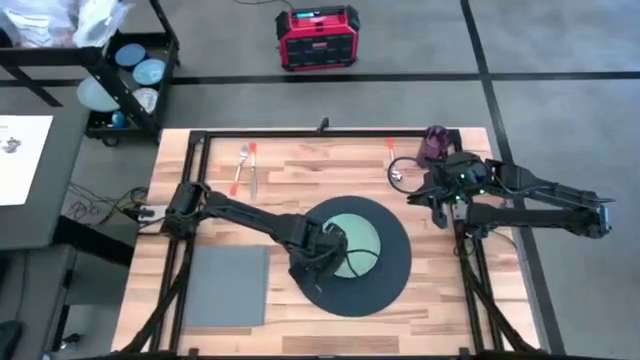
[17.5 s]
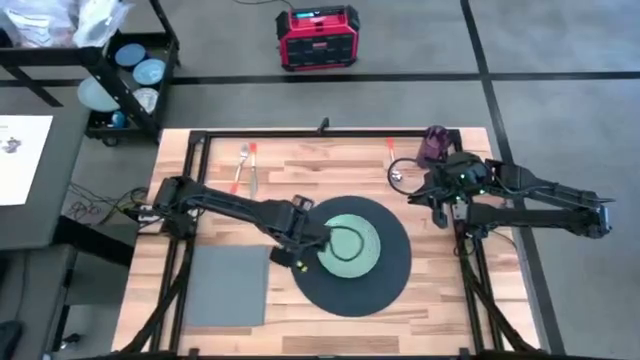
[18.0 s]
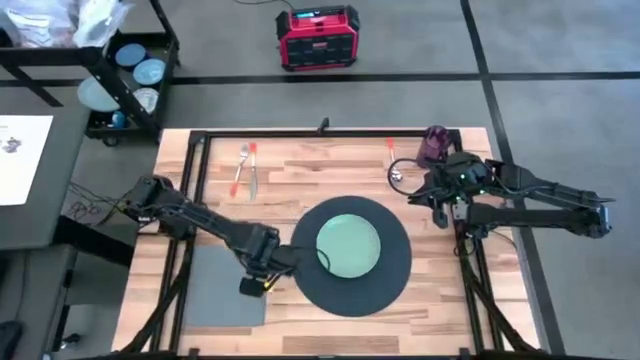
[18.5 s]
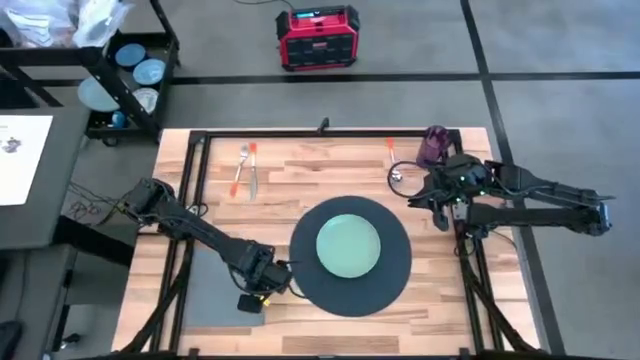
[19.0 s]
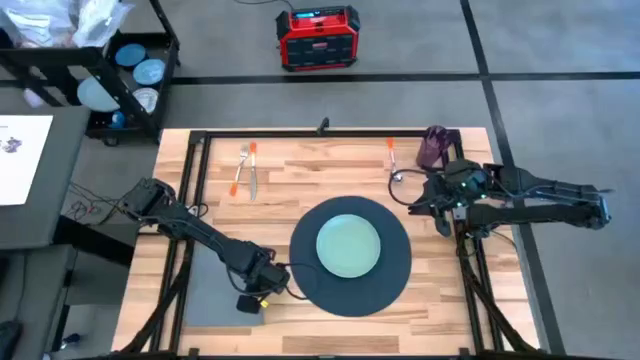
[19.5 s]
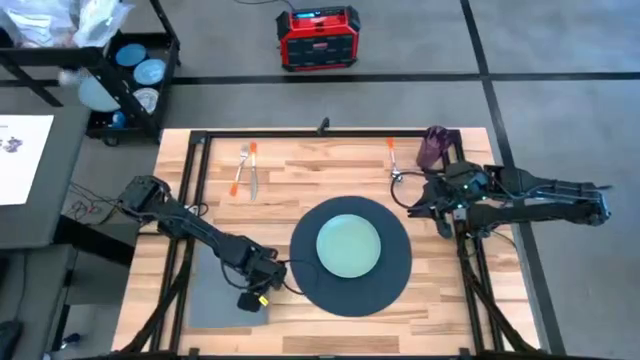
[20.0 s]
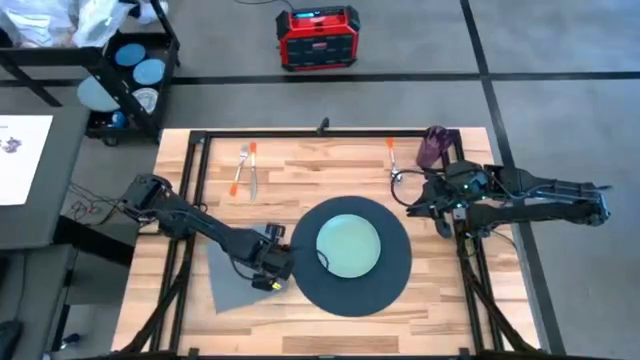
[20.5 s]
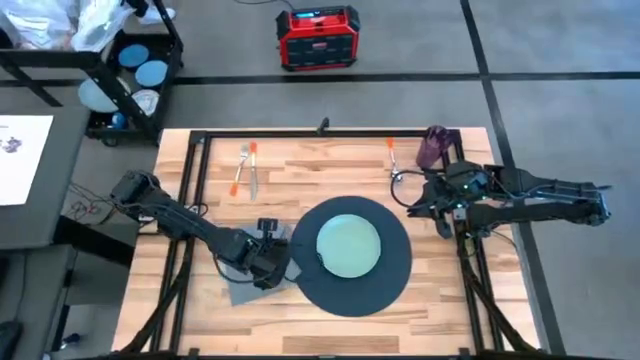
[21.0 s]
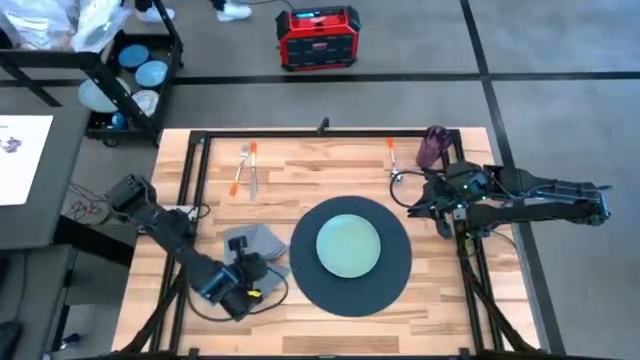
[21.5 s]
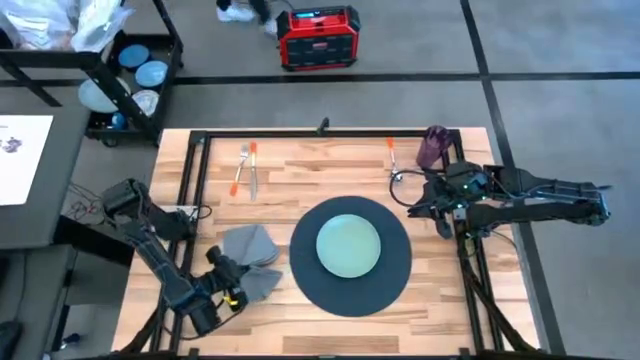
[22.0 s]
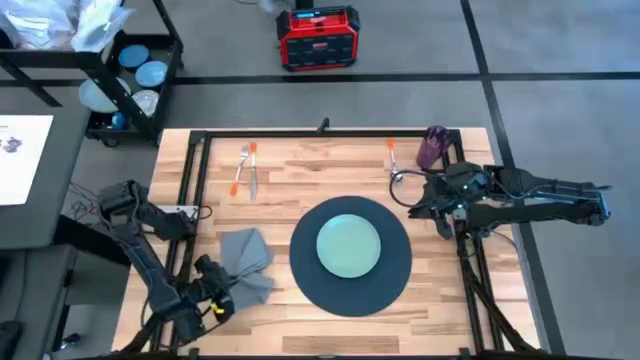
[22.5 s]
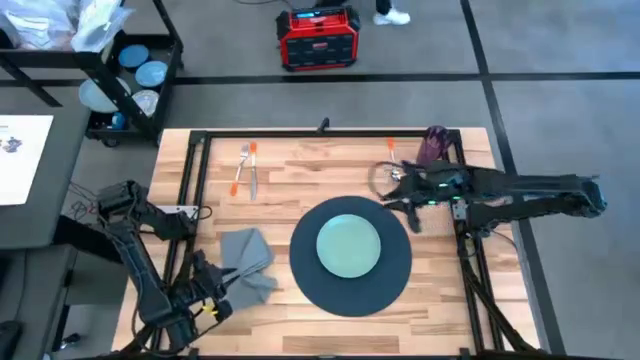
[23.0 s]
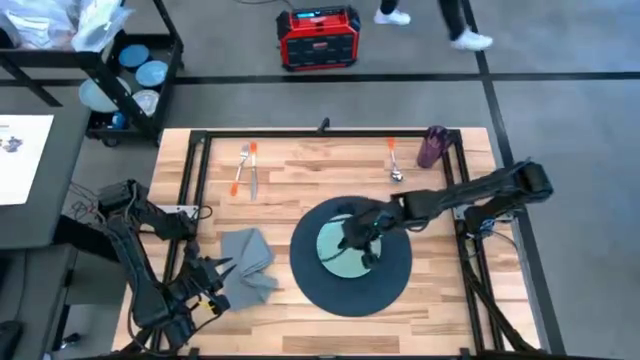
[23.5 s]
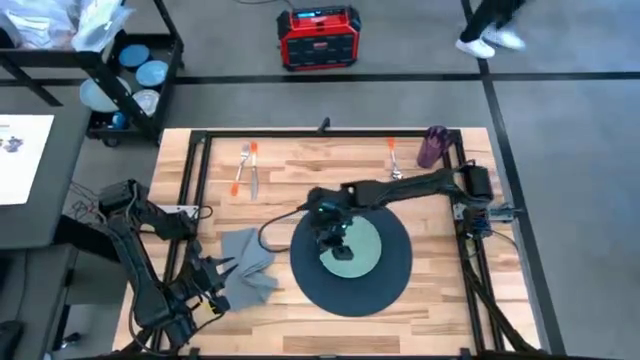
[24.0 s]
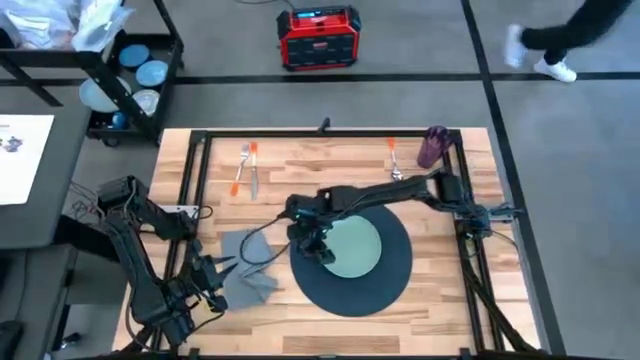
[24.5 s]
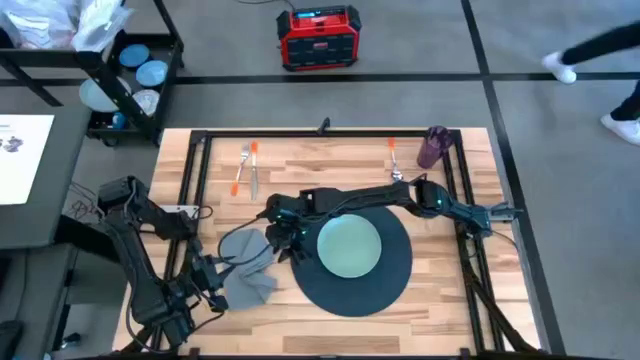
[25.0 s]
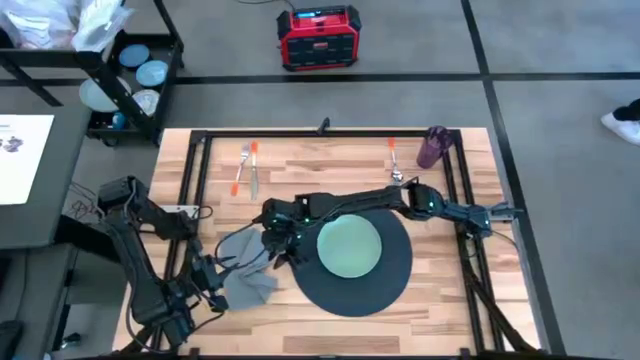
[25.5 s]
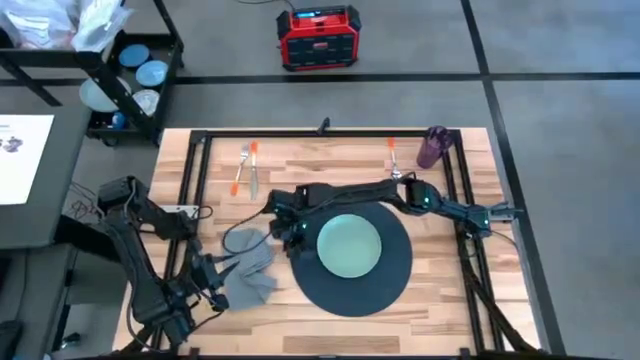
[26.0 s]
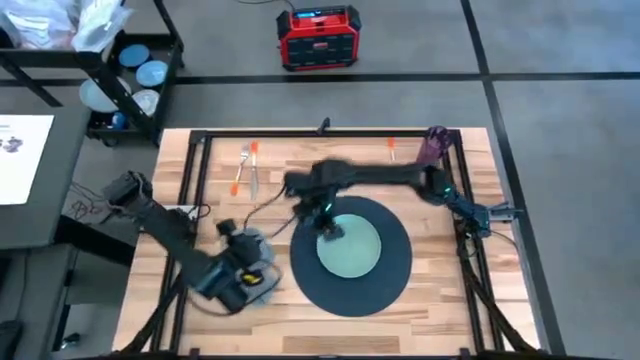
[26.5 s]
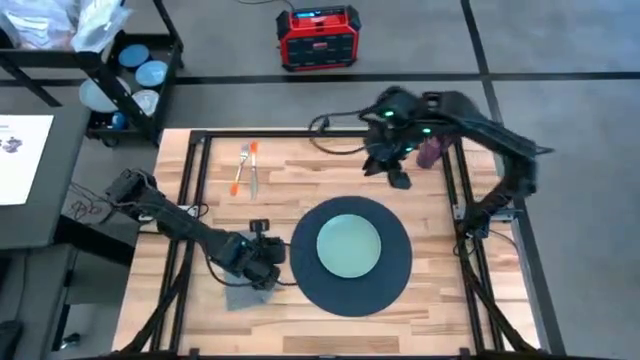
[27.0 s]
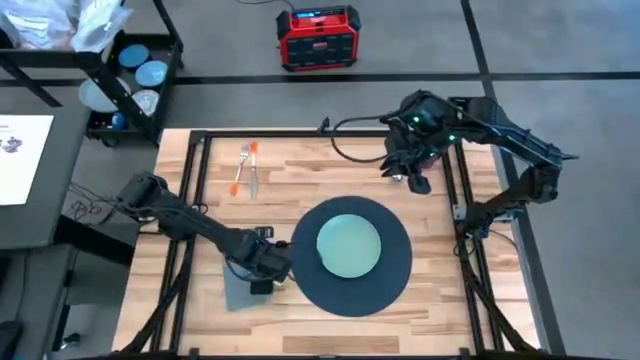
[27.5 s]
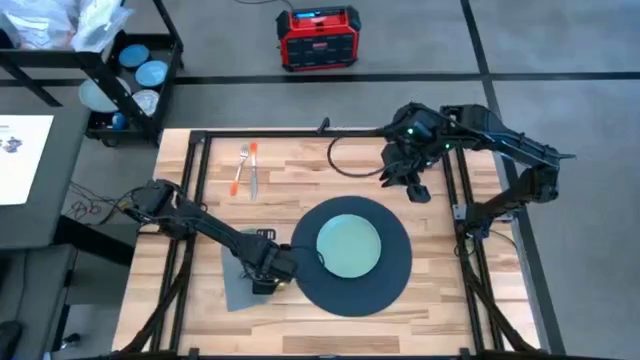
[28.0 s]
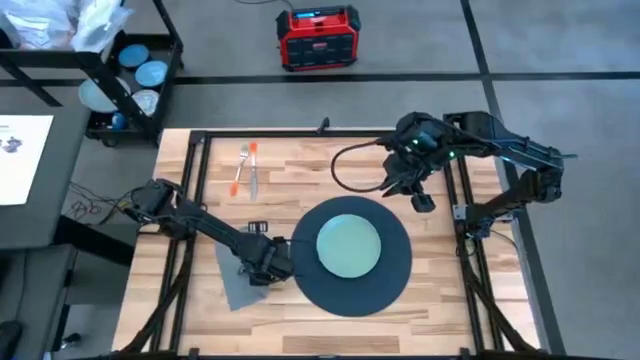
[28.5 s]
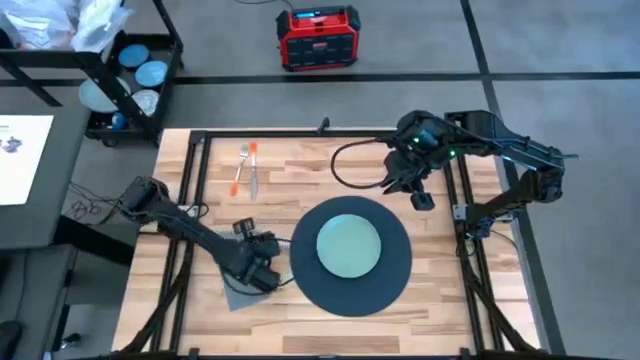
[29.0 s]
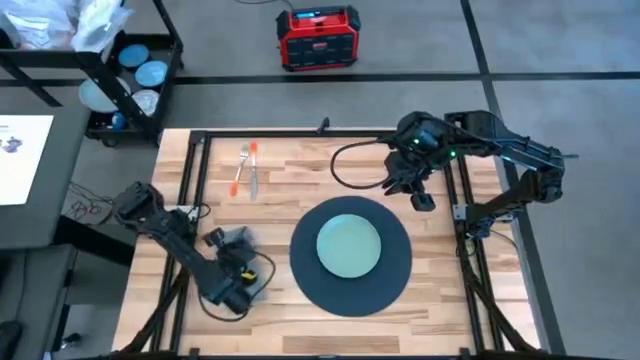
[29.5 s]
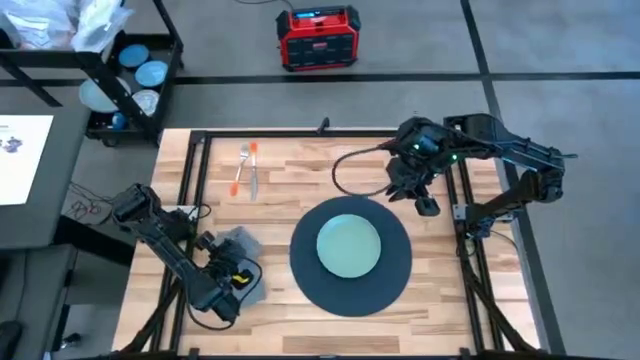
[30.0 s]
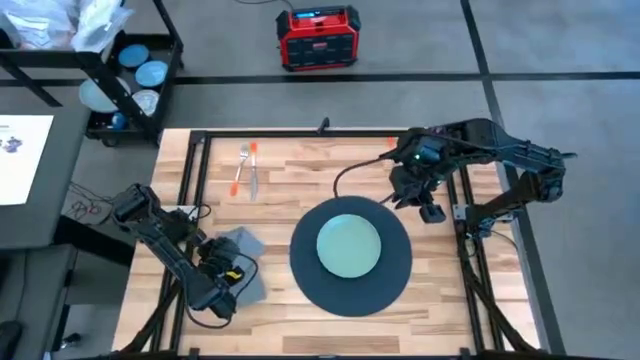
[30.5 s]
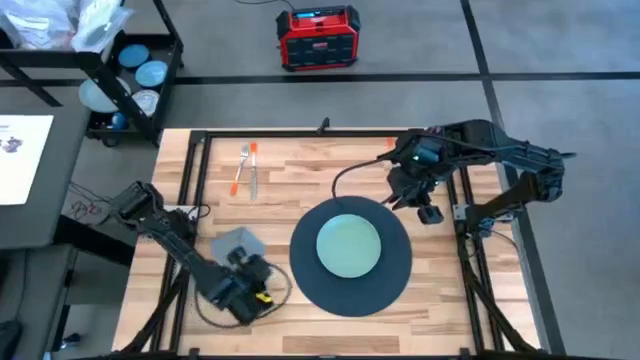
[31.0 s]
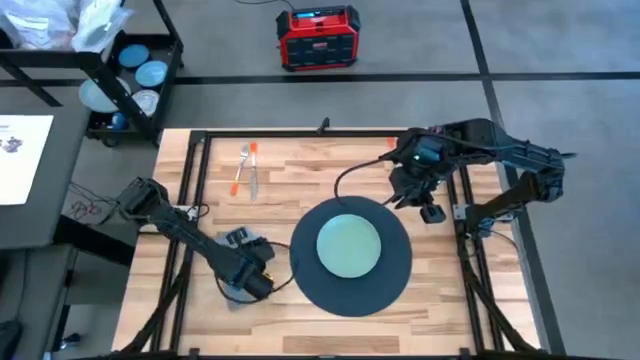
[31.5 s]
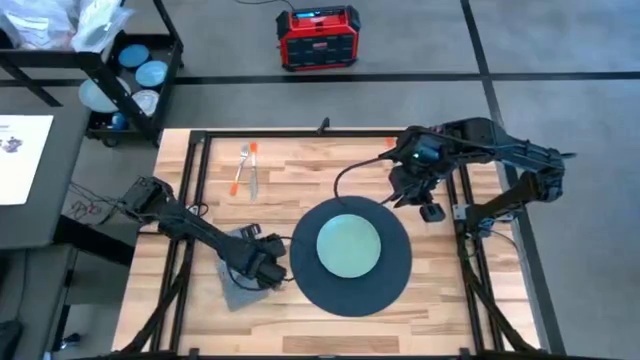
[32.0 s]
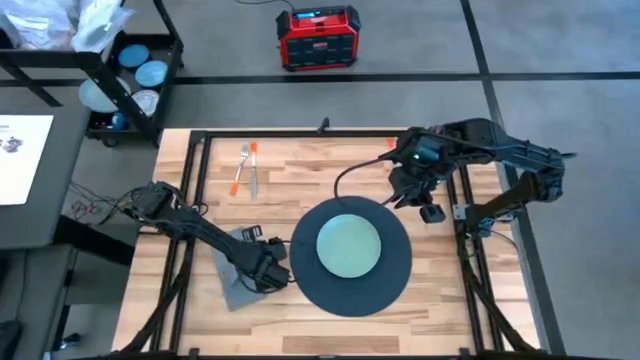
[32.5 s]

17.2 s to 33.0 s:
Task: Set table place
Fold the grey napkin

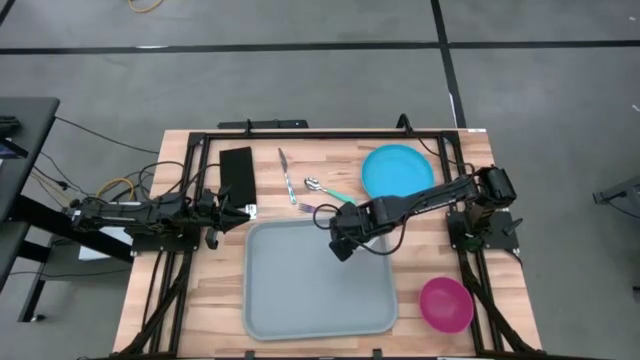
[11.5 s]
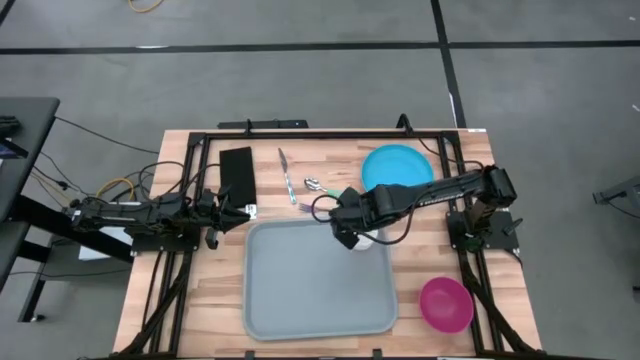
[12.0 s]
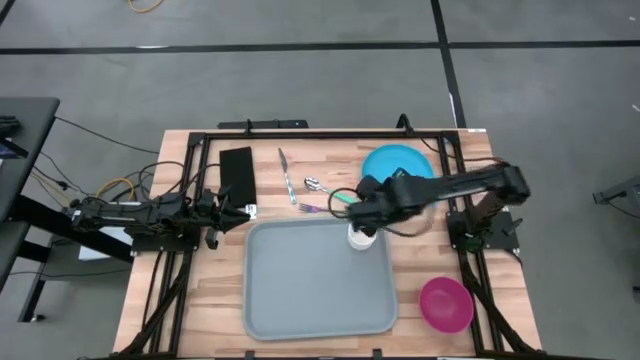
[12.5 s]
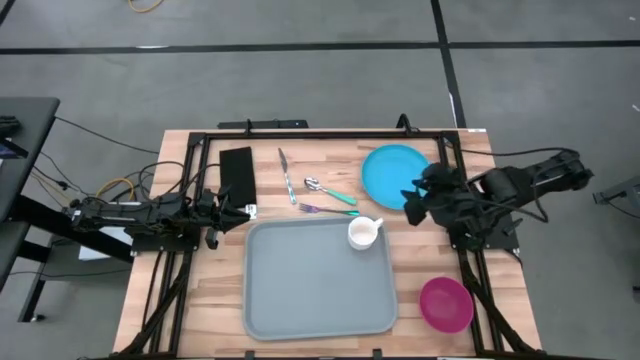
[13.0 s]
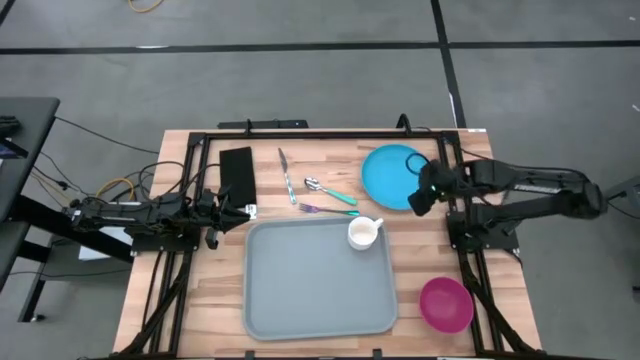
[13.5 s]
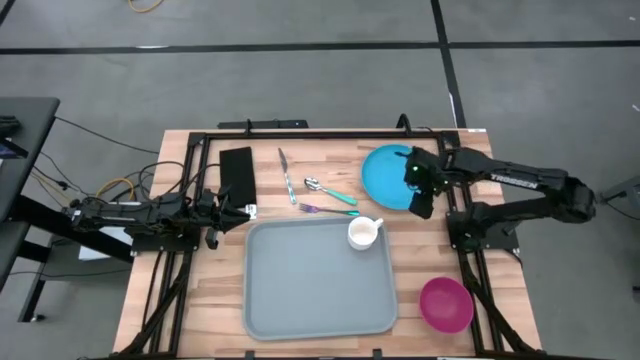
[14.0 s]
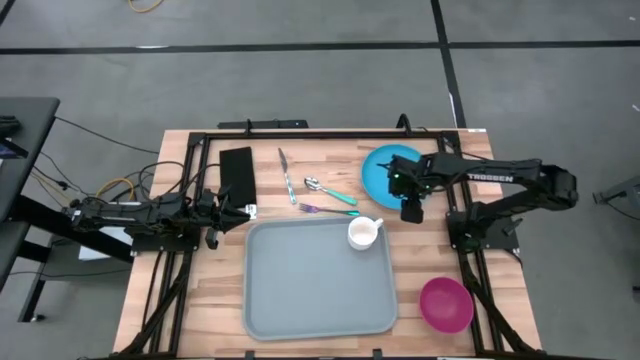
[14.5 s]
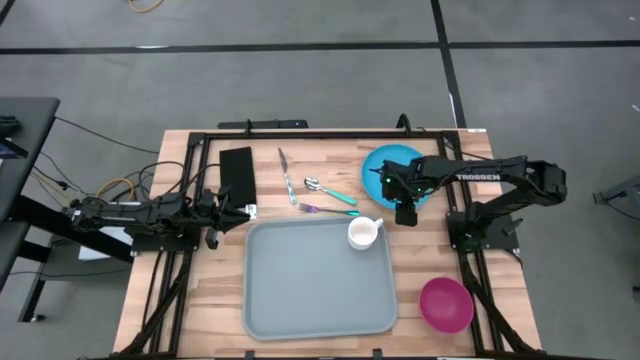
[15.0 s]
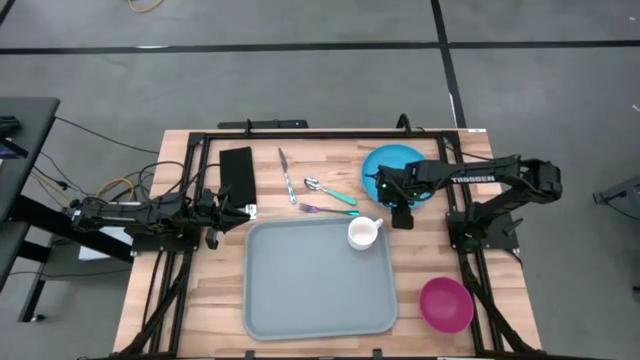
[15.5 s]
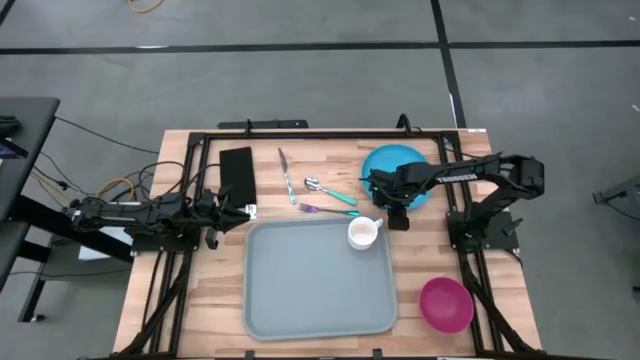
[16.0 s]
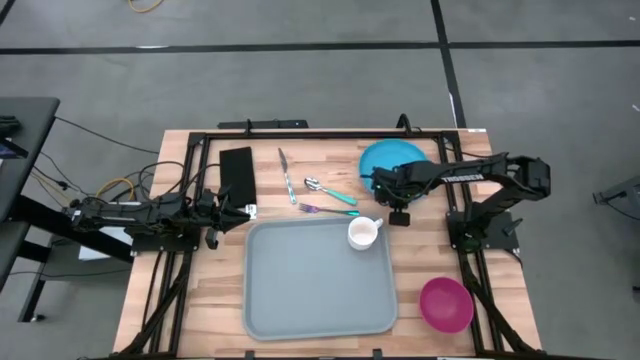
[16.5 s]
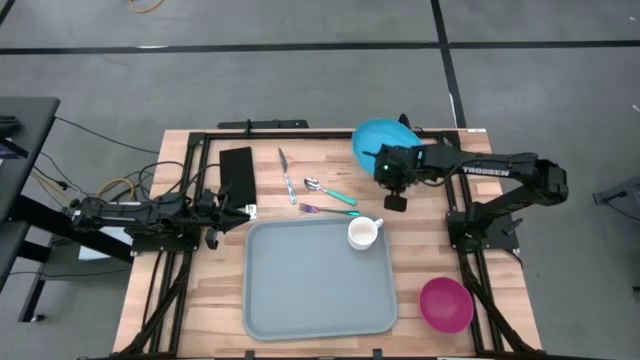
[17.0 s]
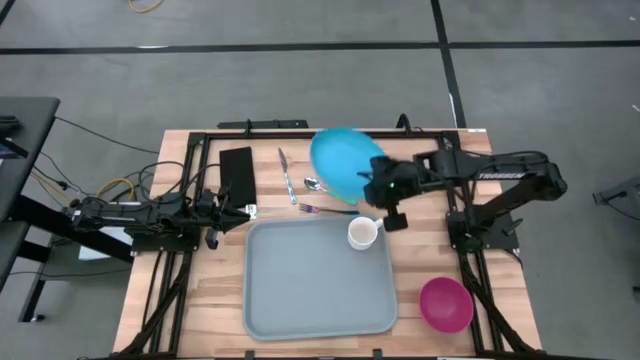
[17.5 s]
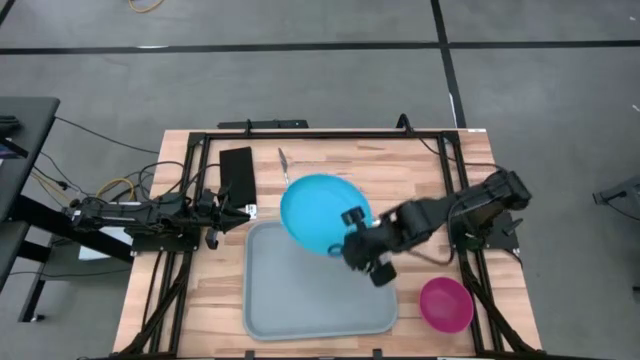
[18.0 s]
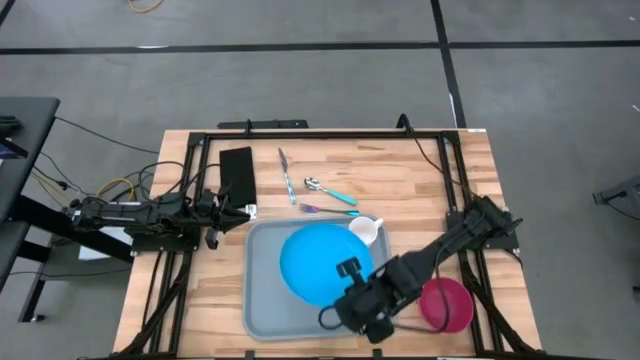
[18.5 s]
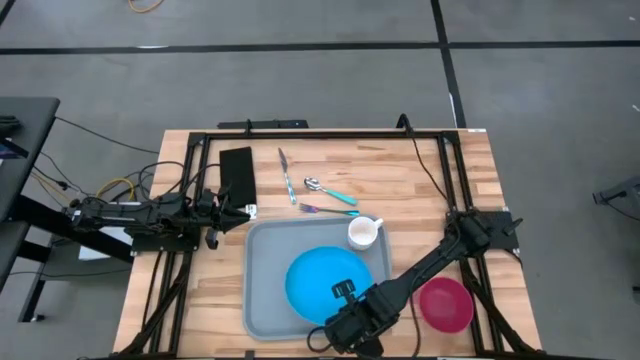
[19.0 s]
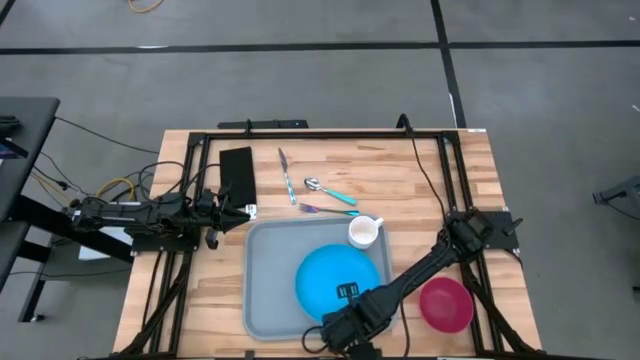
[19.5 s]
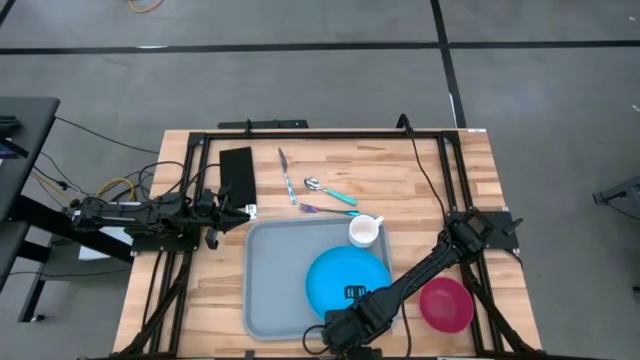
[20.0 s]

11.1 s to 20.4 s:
Task: Set up tray
Put the blue plate on the gray serving tray at the bottom of the white mug
